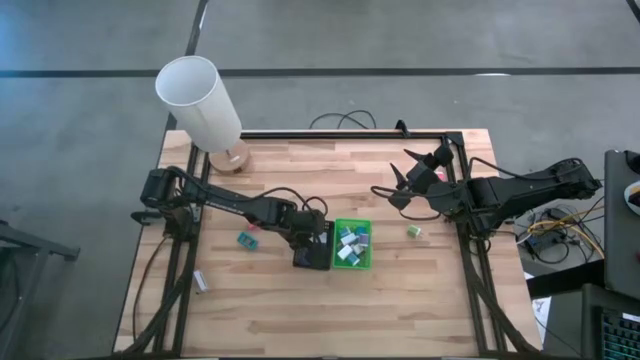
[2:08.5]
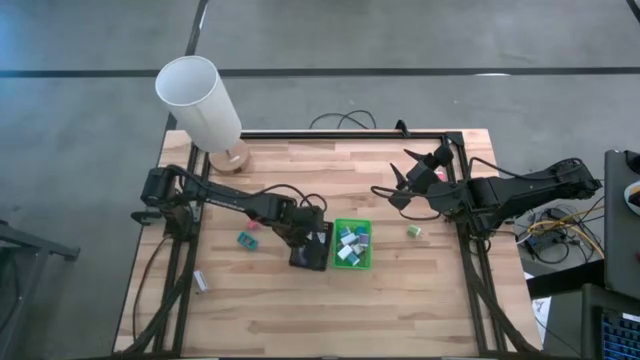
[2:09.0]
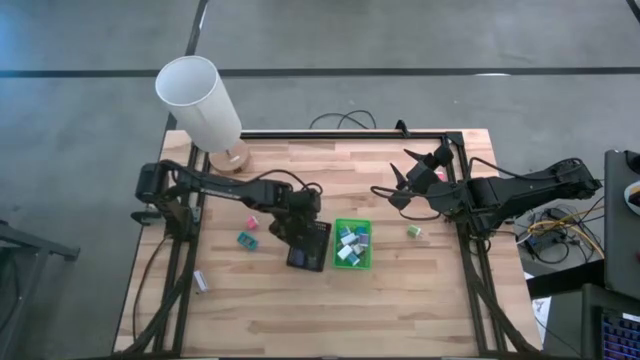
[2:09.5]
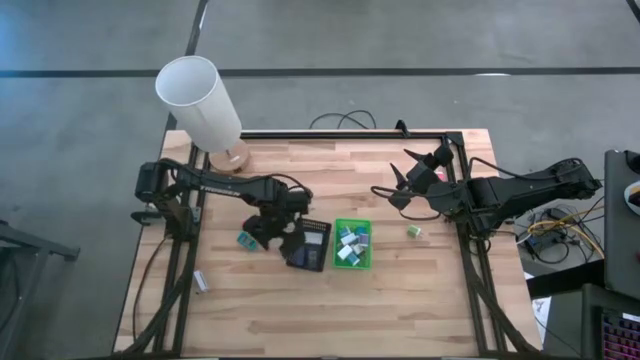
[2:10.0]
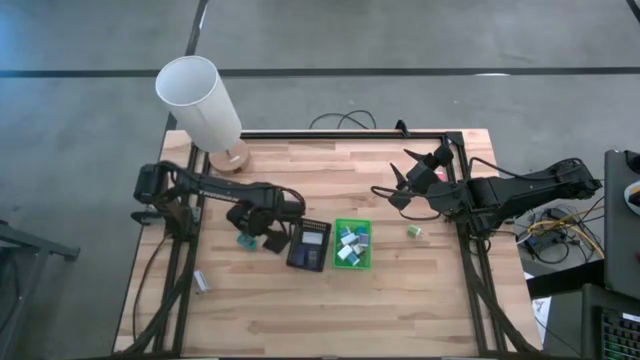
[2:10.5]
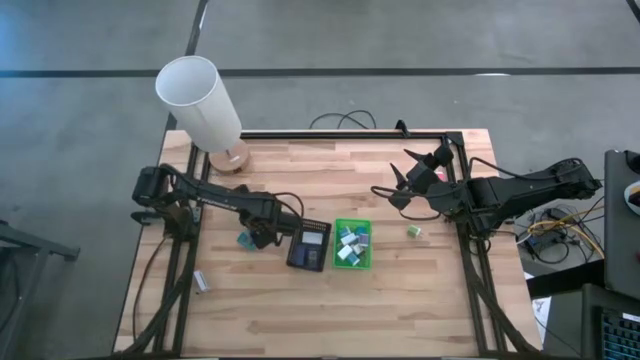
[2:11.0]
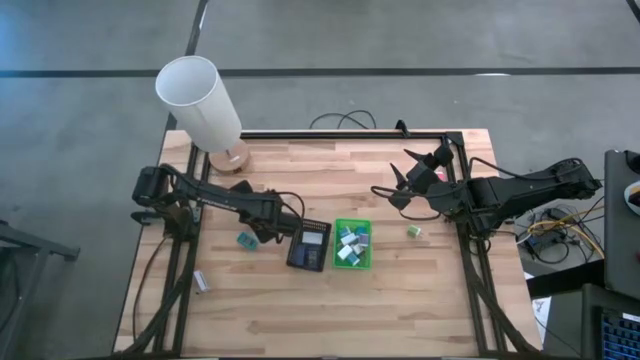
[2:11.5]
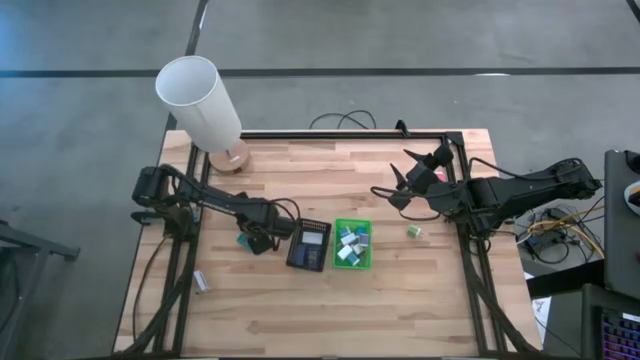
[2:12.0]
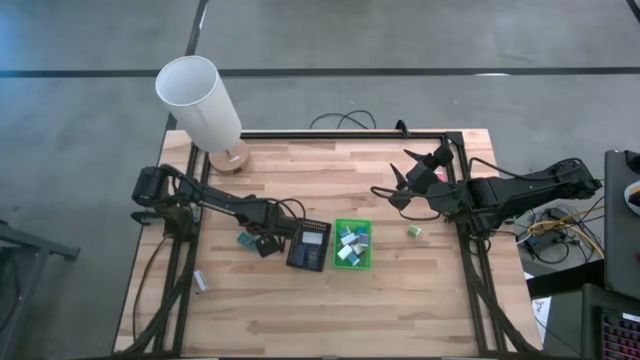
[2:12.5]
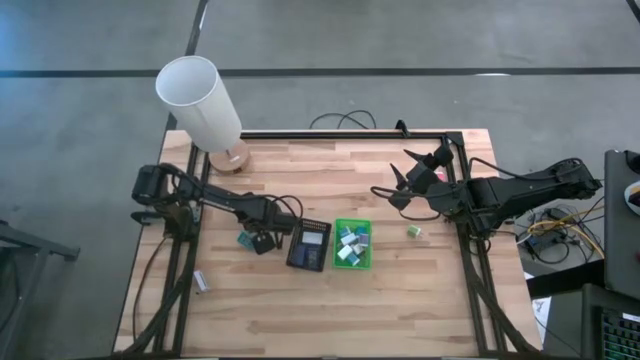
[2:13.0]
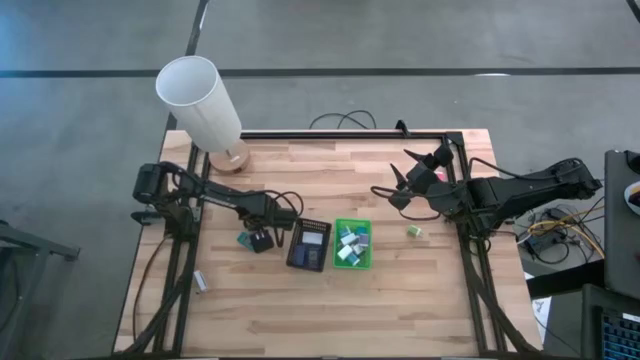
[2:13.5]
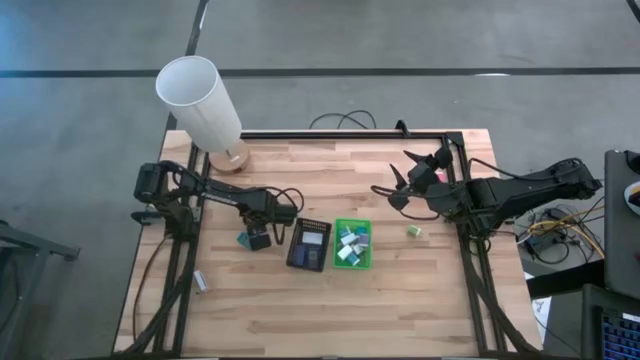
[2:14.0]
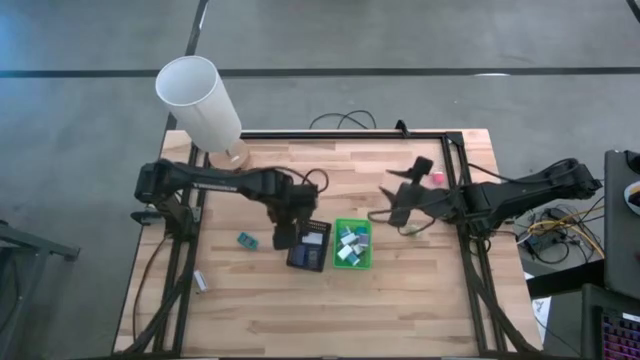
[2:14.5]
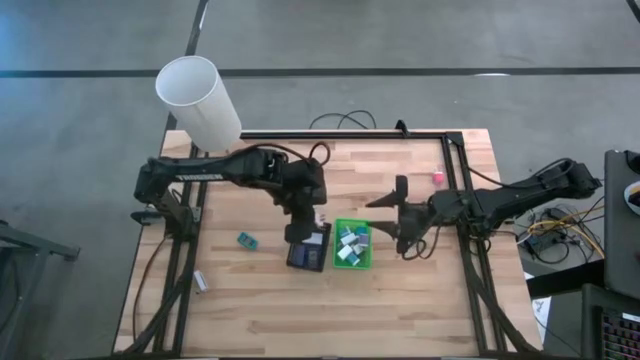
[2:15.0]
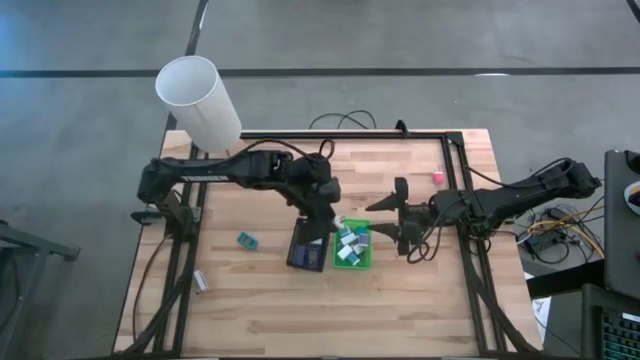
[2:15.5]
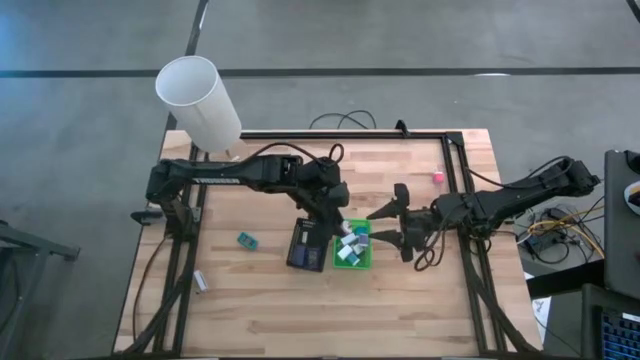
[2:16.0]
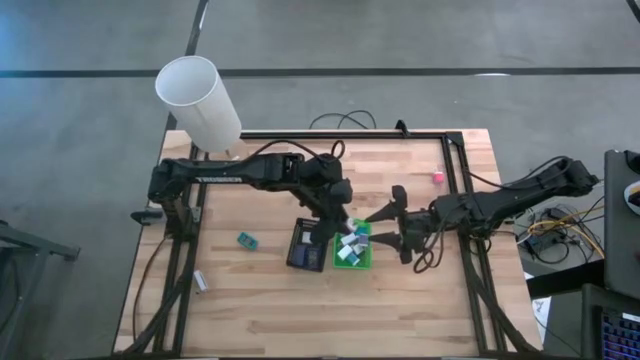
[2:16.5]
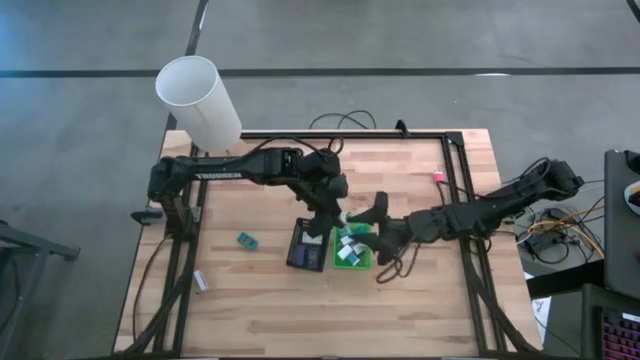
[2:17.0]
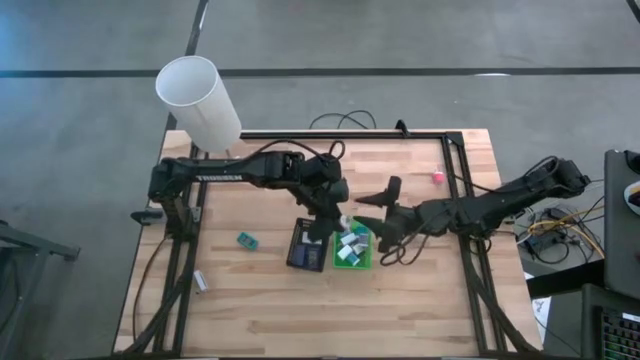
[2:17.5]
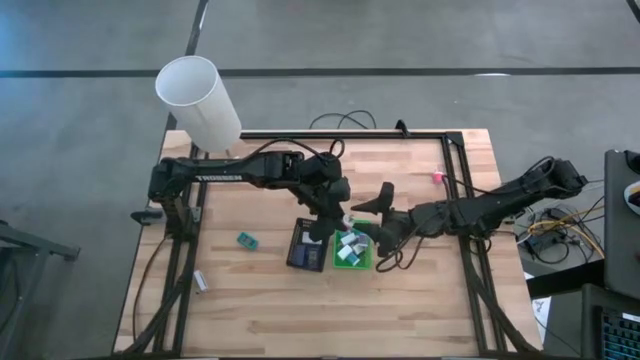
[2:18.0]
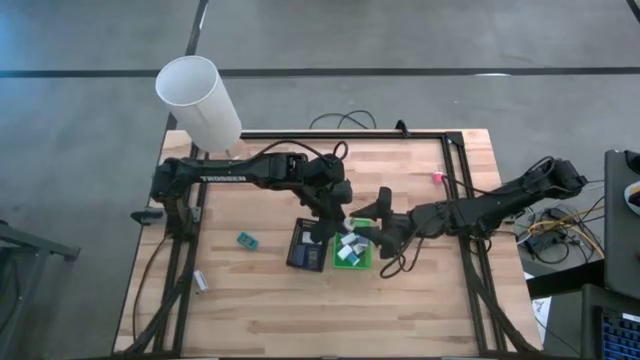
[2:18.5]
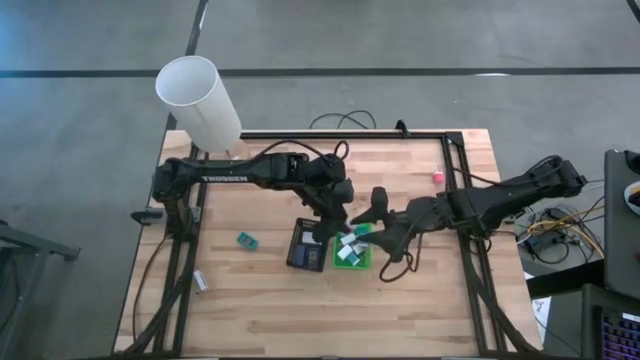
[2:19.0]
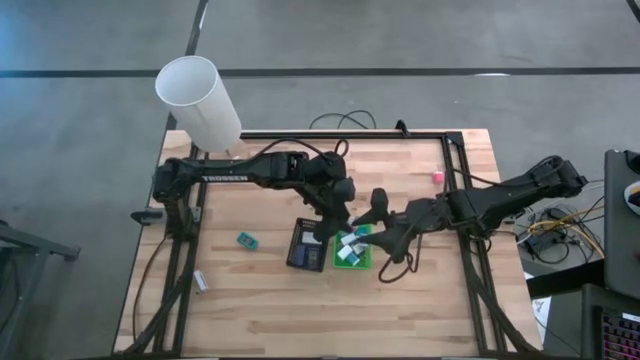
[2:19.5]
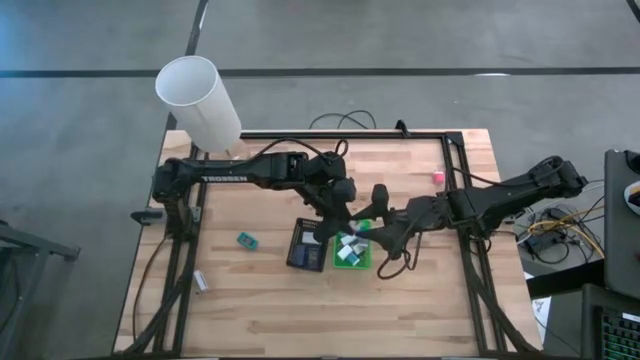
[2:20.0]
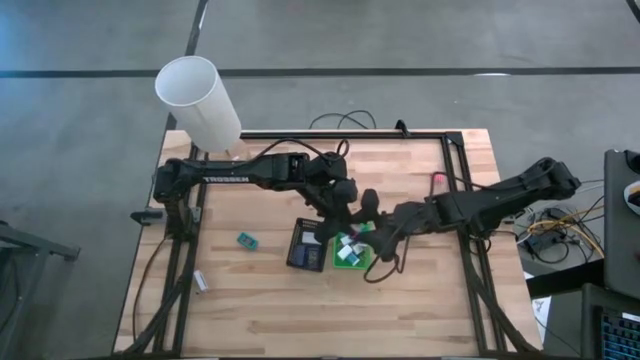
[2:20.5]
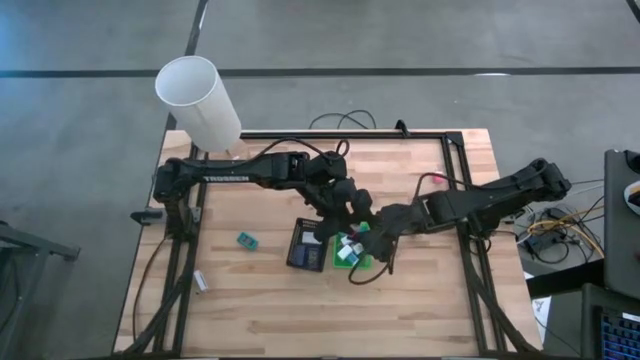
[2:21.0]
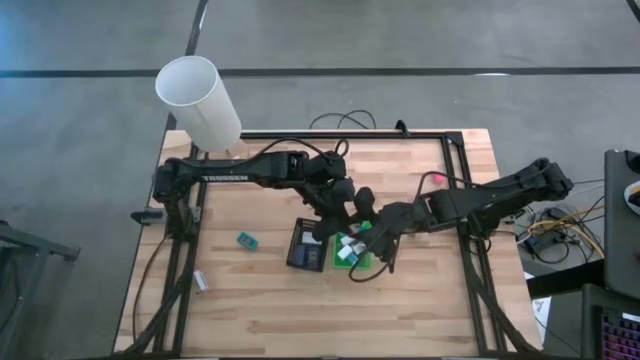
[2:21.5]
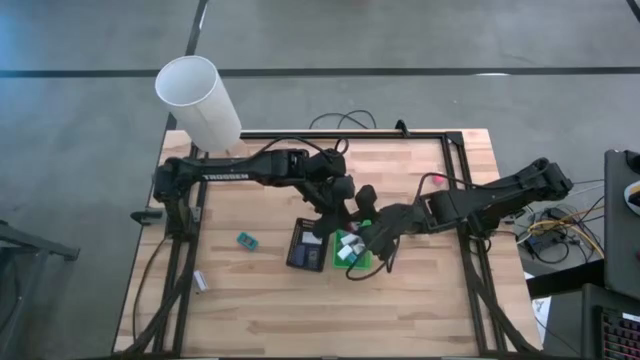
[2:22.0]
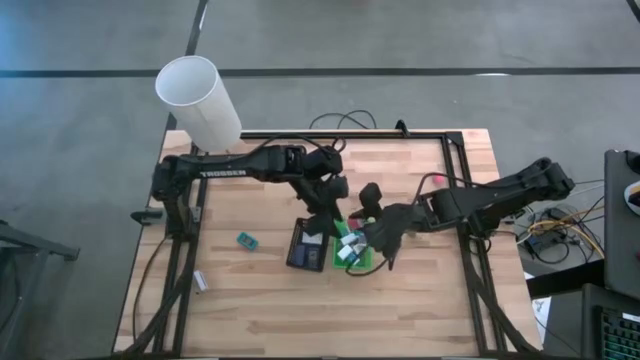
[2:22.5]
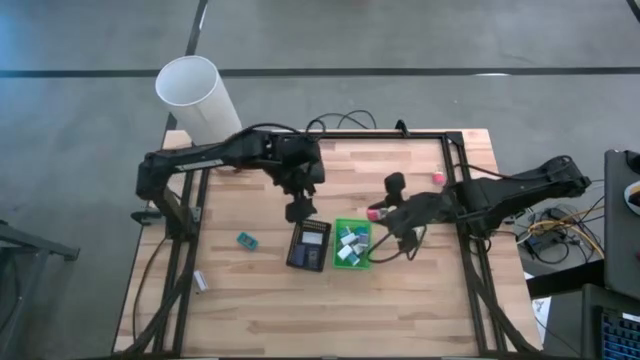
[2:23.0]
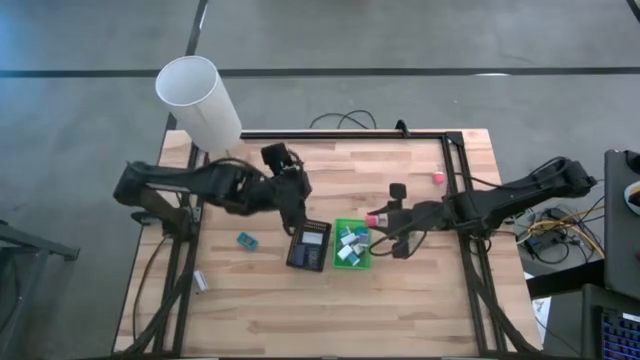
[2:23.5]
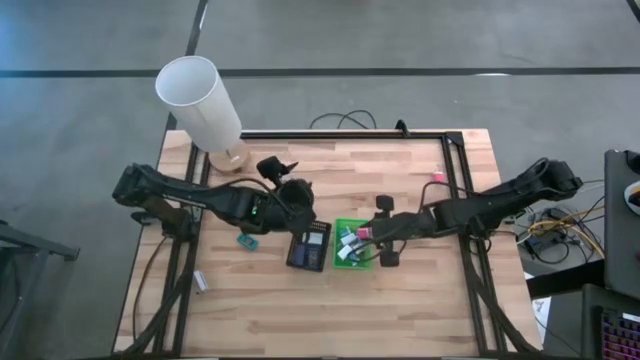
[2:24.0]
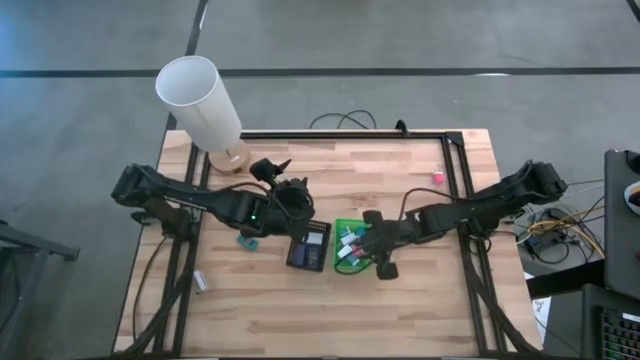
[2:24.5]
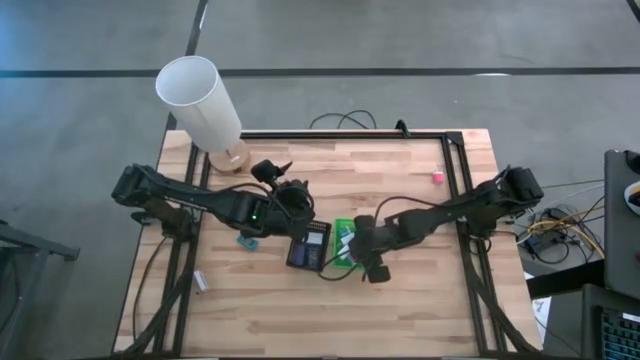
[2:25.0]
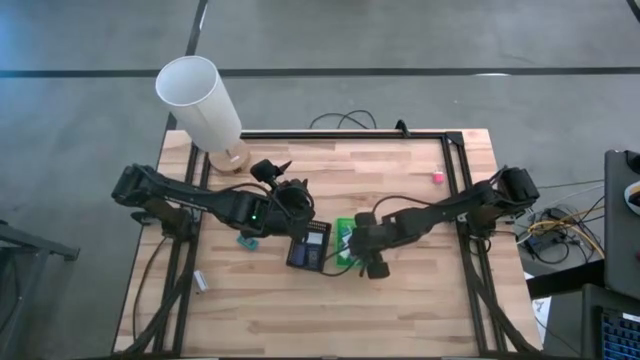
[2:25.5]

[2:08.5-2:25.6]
Task: Pick & Place Office items
Put the left pink charger adapter into the green basket

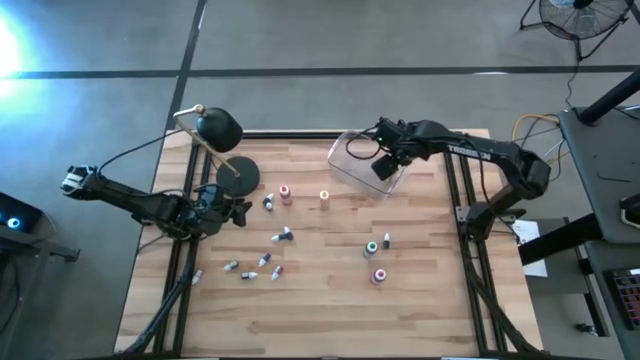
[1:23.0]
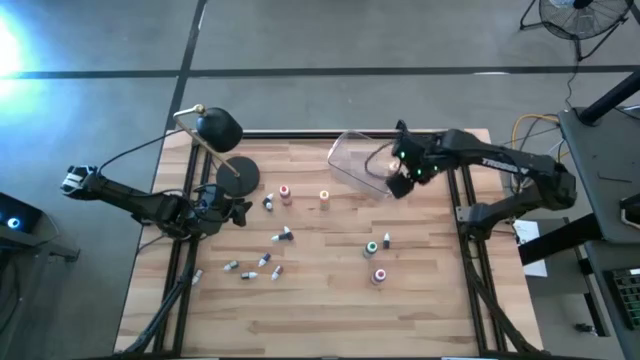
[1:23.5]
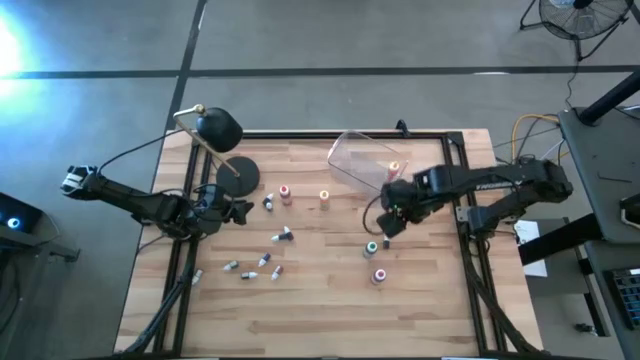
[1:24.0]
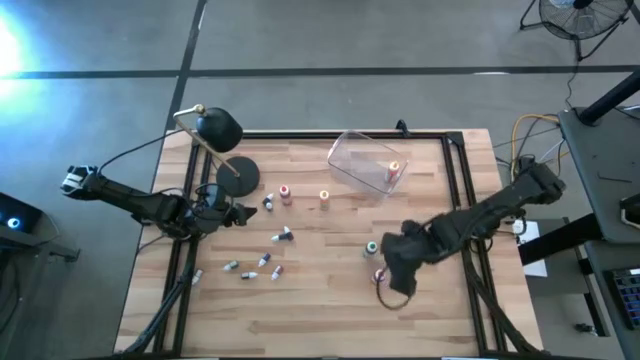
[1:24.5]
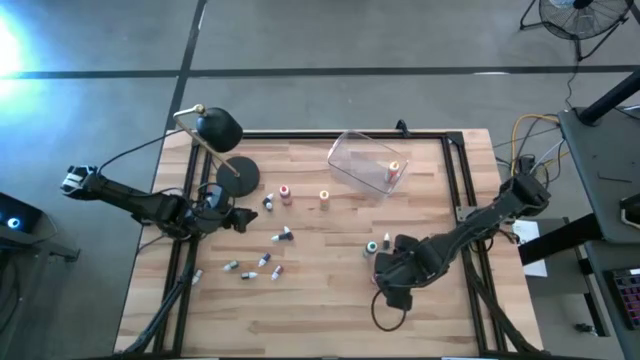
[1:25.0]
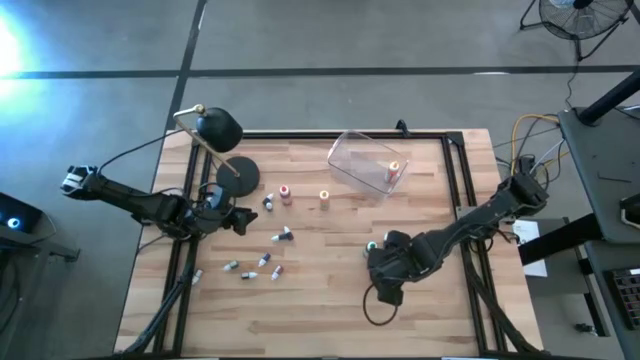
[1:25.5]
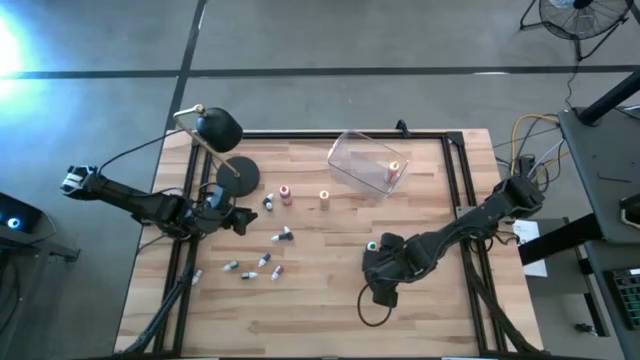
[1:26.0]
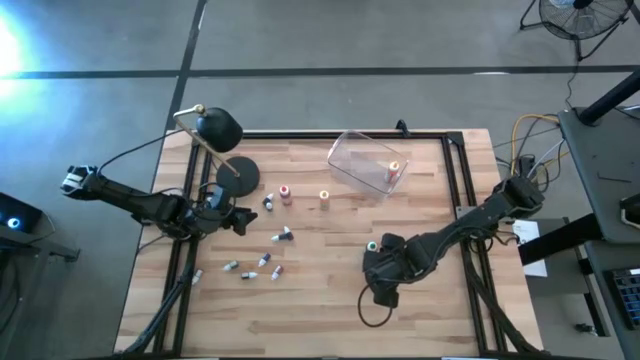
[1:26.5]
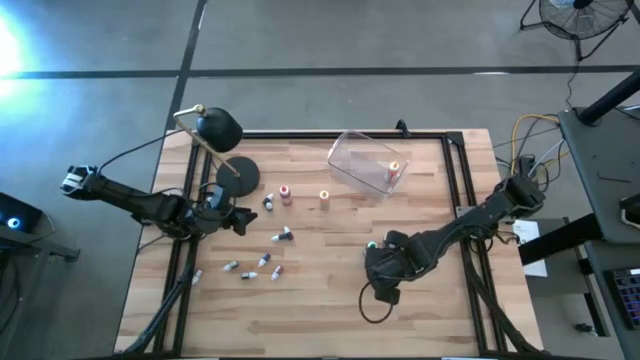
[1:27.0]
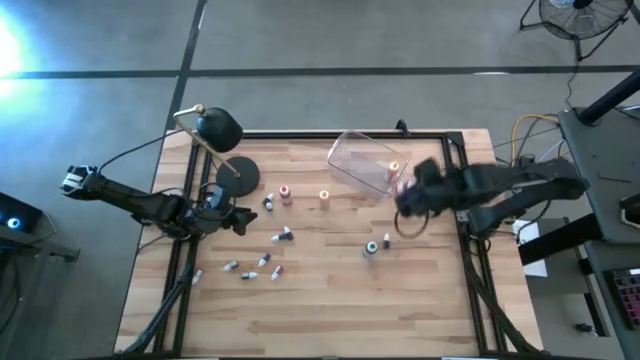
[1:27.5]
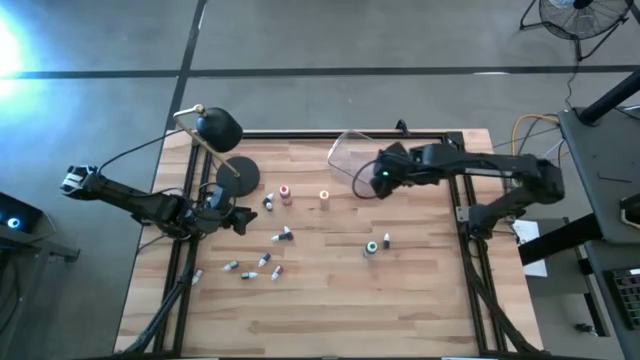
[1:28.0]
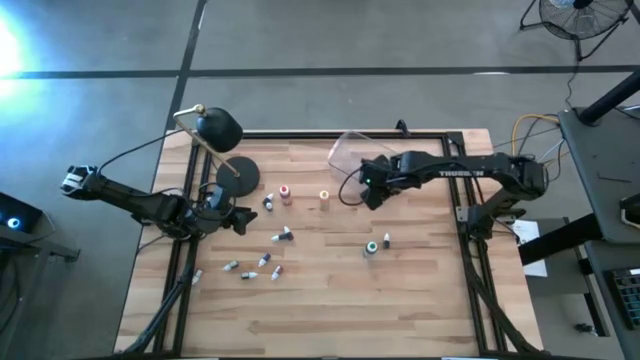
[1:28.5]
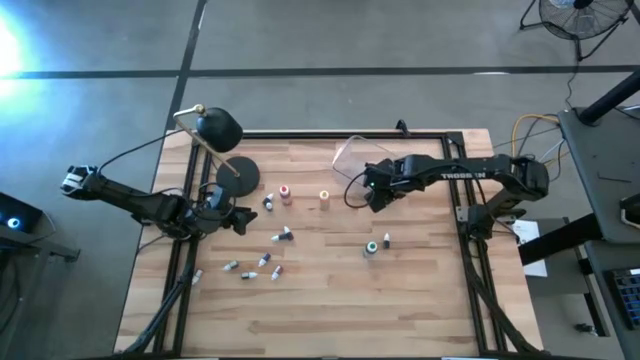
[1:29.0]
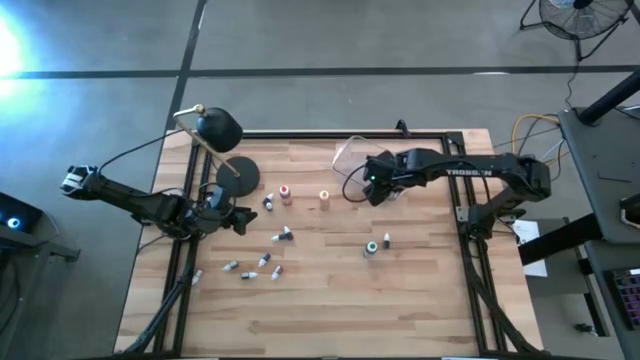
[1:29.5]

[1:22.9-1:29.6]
Task: Pick & Place food coloring
Put the large red food coloring bottle into the transparent bin
